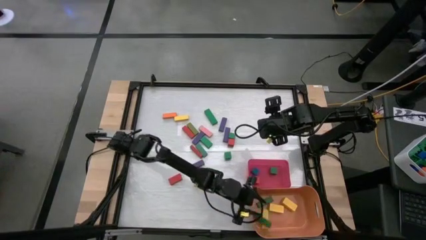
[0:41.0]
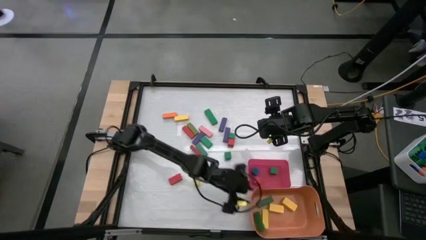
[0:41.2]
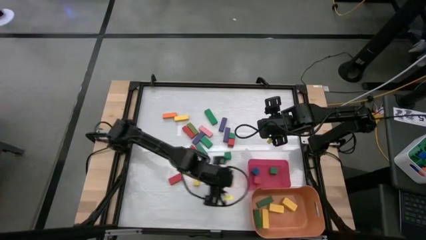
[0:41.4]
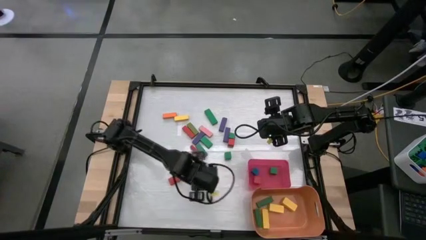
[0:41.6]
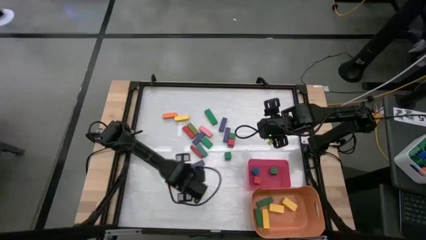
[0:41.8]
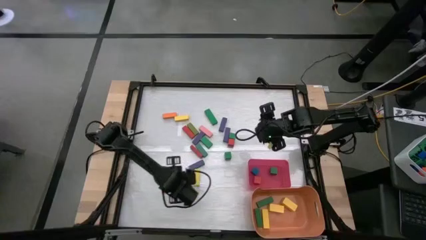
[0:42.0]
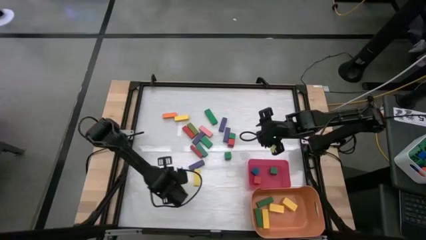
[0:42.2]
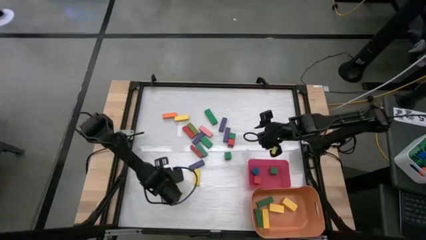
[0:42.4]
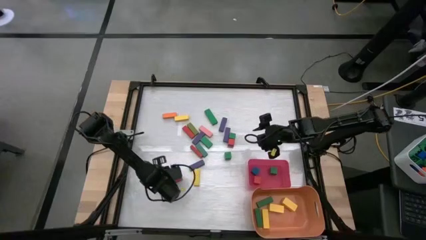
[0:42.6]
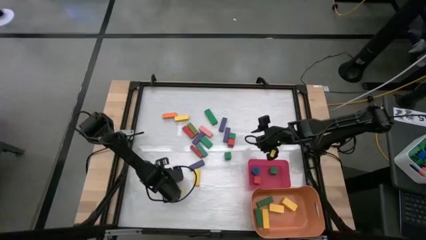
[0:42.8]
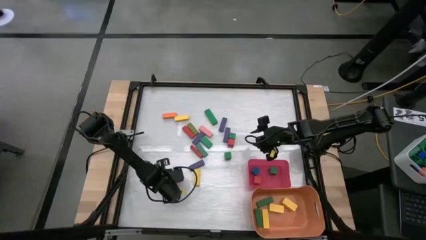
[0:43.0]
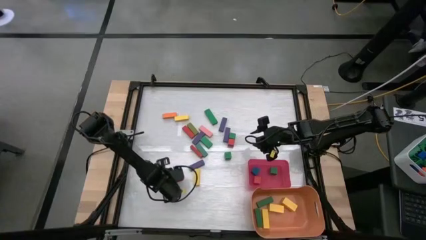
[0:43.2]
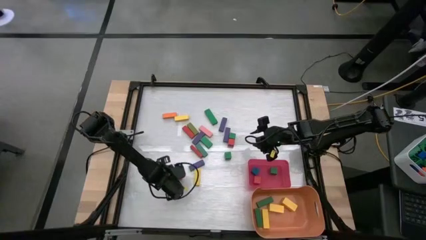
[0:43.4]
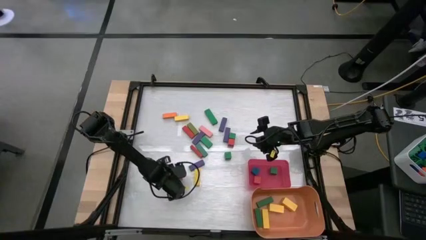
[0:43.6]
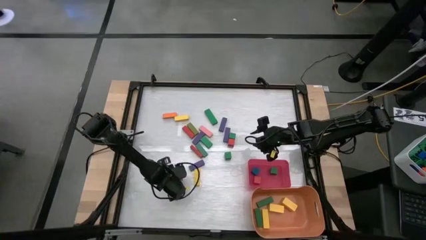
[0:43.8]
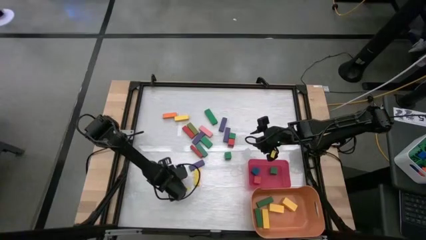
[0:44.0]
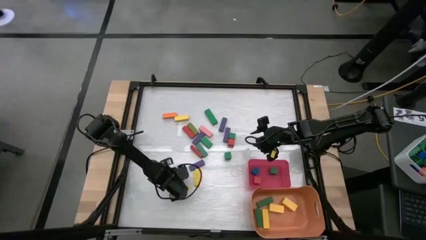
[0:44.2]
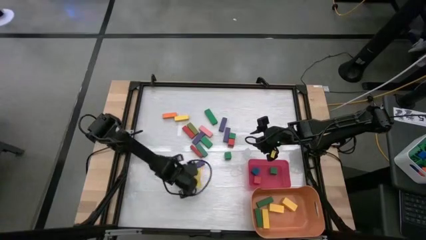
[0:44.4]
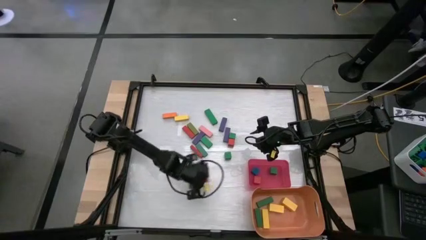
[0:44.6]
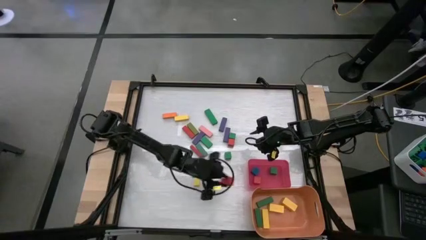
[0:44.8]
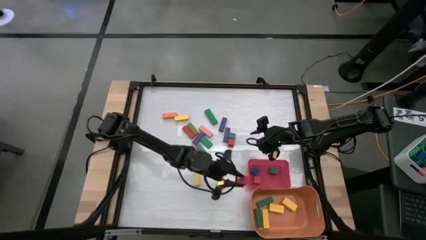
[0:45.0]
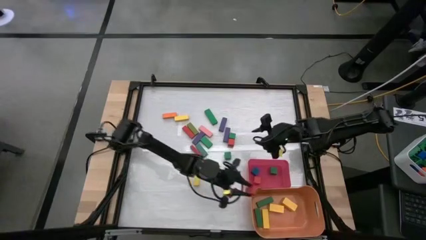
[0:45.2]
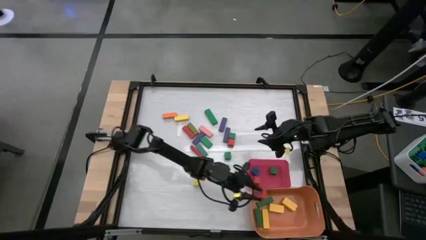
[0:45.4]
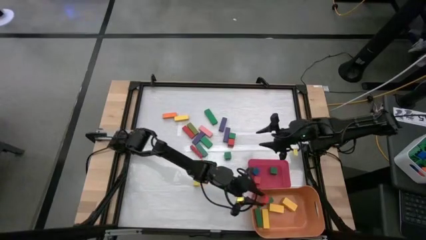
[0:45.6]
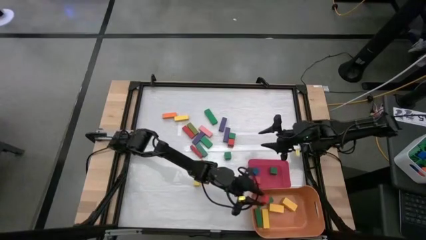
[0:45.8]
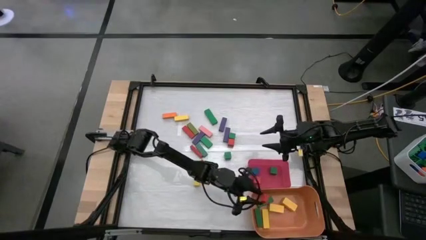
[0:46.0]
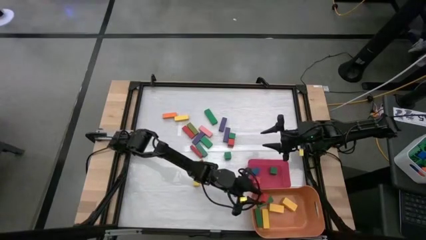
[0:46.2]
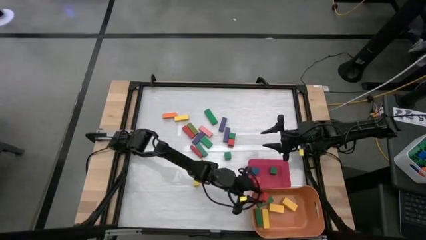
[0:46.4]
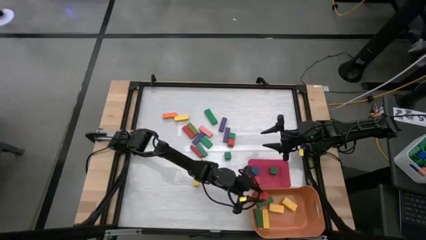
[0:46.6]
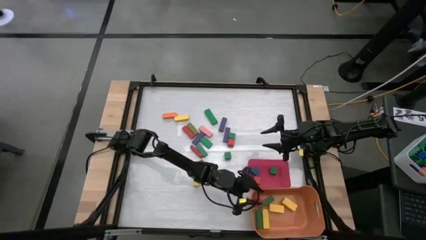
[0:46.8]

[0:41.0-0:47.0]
Task: Sort blocks by size
Put the red rectangle block into the orange bin

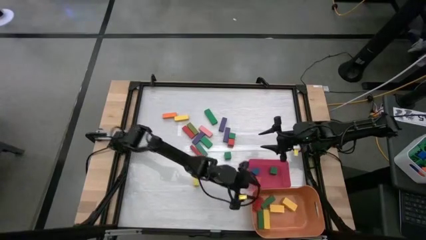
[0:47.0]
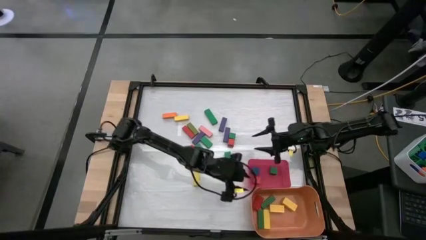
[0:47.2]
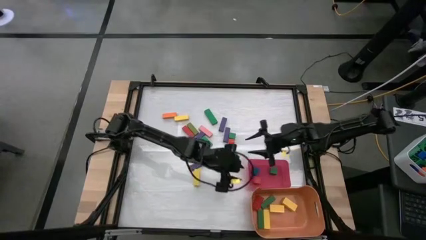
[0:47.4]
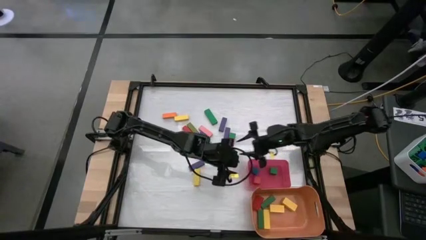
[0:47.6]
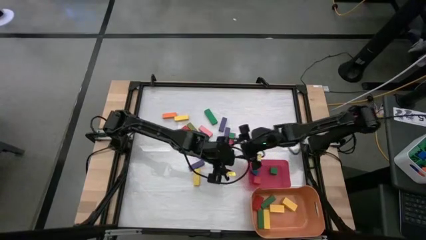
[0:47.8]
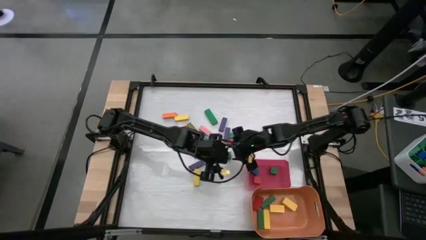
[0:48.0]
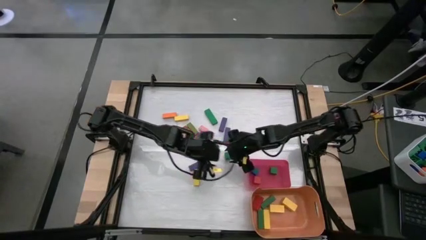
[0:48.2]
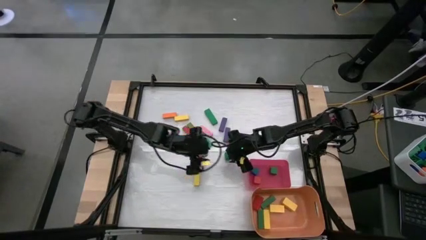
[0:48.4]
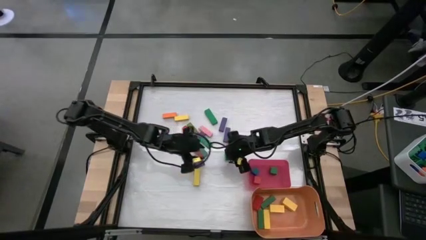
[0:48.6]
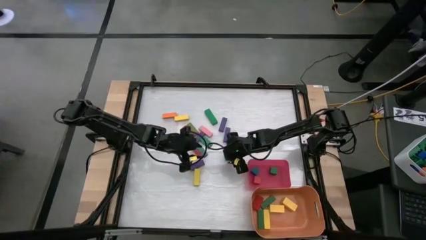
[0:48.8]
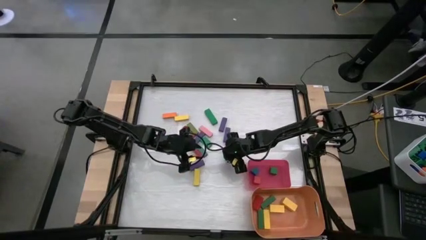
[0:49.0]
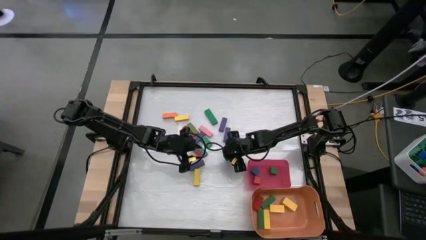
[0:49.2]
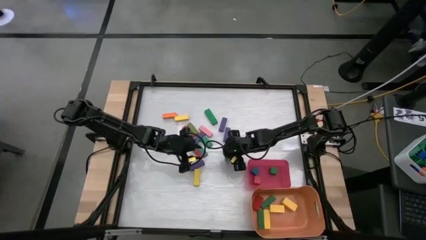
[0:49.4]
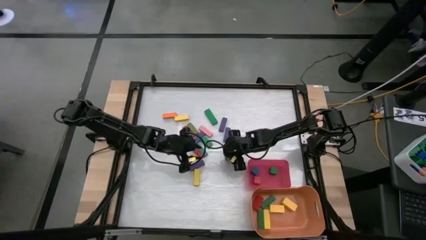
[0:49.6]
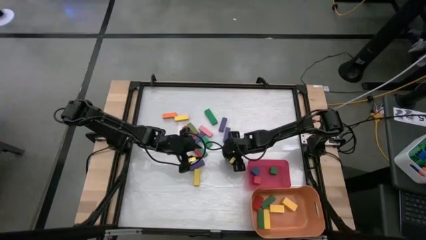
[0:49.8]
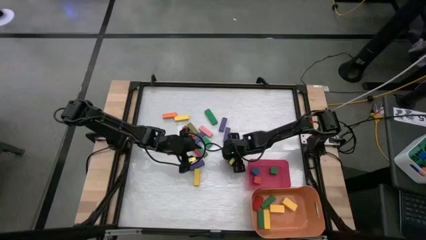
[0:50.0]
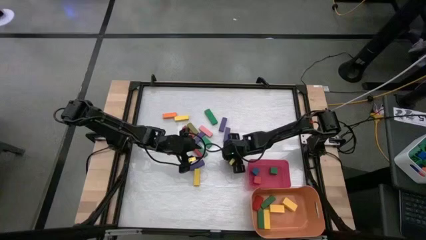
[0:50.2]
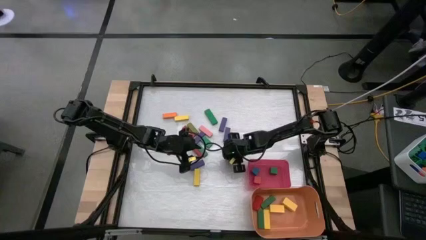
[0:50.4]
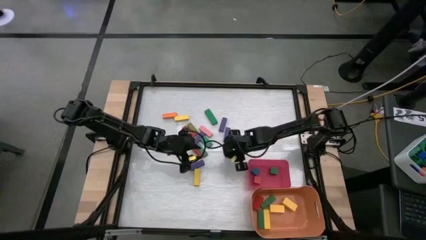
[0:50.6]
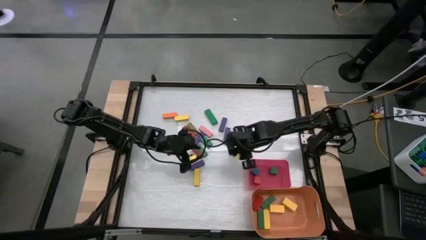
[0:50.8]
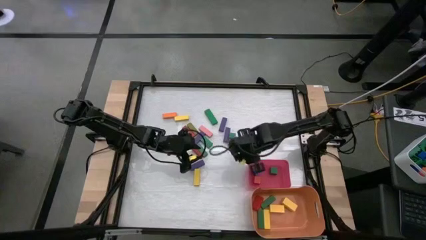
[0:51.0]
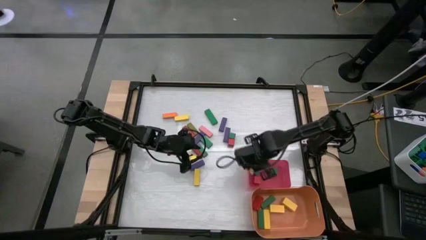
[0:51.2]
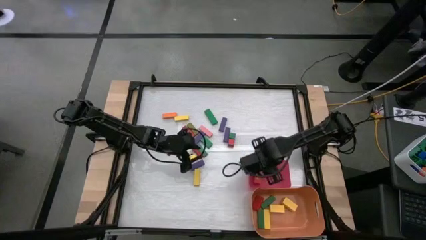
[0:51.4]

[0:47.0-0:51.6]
Put the green square block into the pink bin

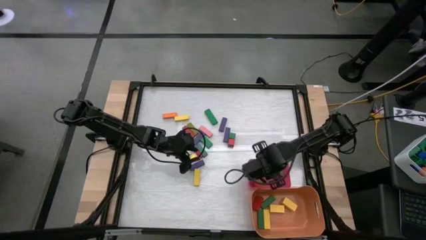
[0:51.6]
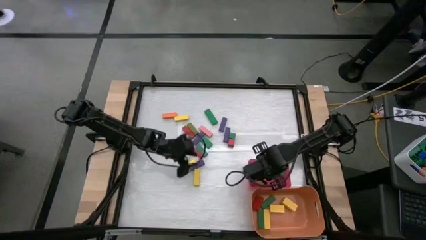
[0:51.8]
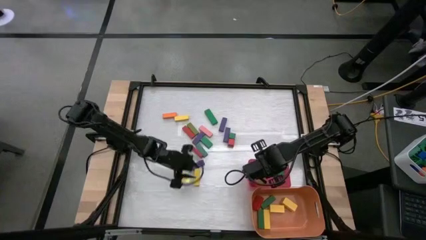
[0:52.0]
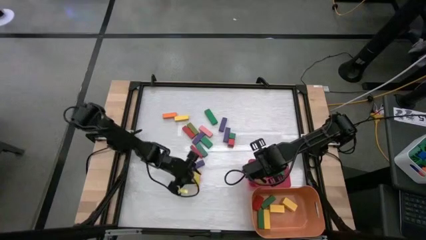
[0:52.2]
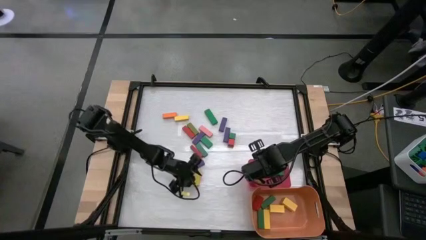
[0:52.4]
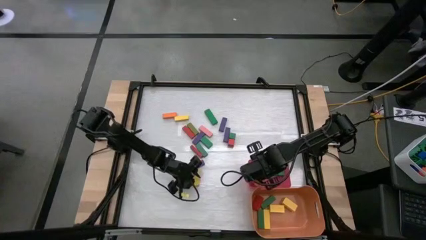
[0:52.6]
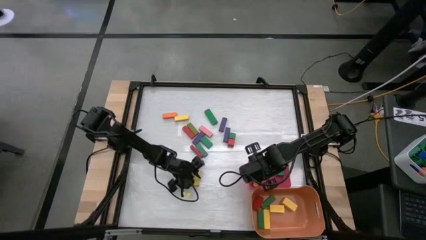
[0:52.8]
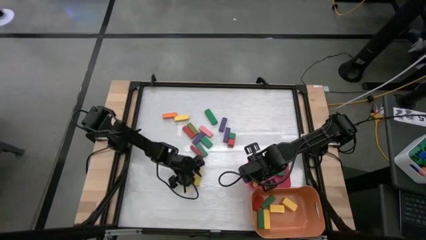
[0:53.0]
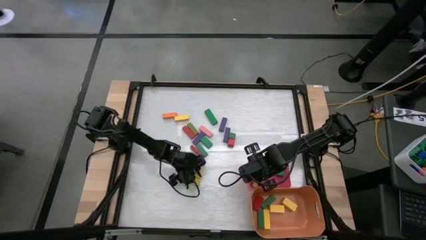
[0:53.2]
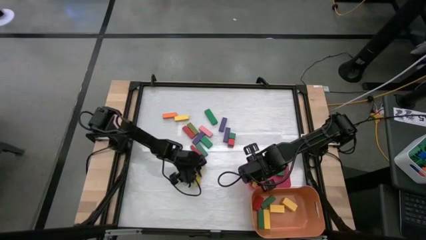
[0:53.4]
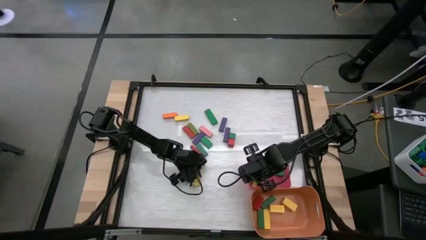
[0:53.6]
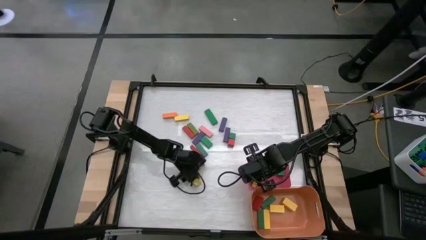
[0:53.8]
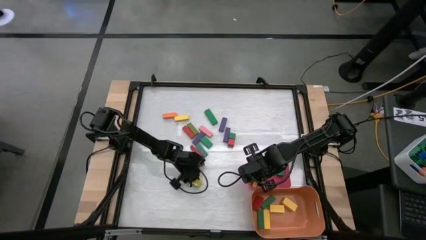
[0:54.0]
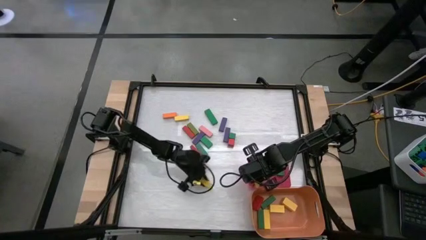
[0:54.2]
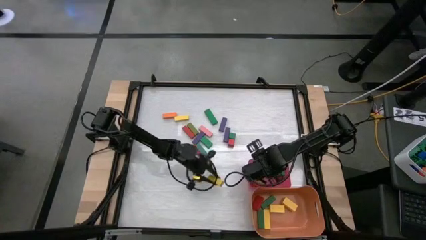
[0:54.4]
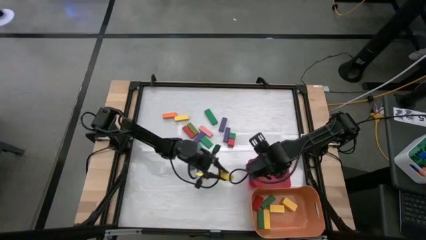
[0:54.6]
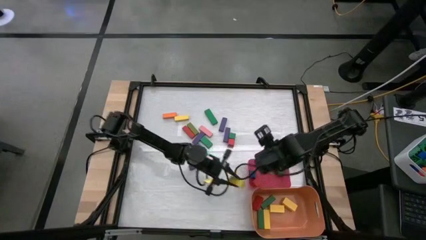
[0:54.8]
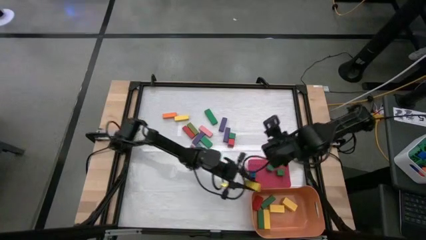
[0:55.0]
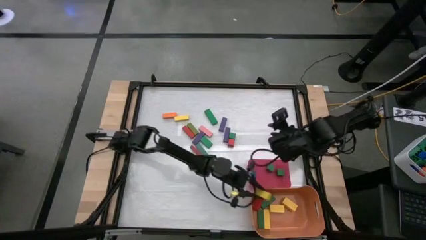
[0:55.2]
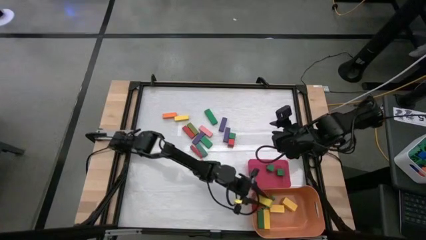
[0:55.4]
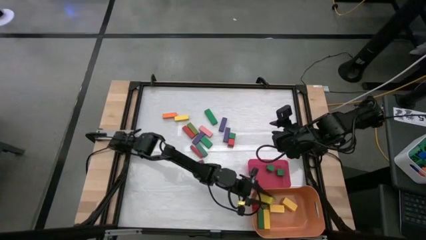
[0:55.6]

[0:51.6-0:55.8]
Put the yellow rectangle block into the orange bin

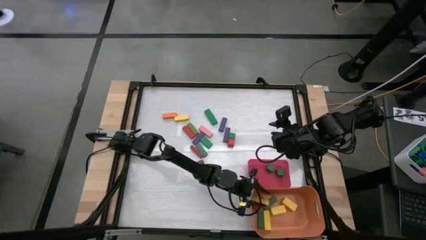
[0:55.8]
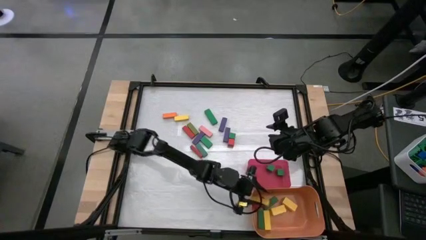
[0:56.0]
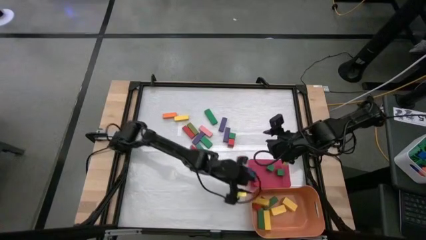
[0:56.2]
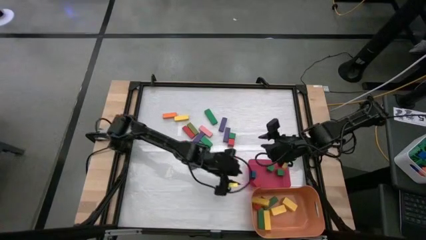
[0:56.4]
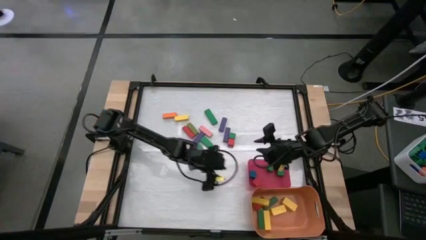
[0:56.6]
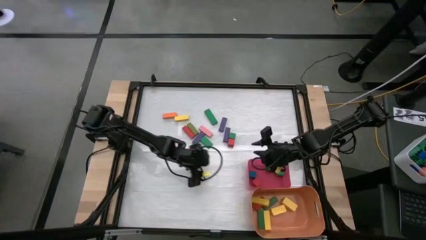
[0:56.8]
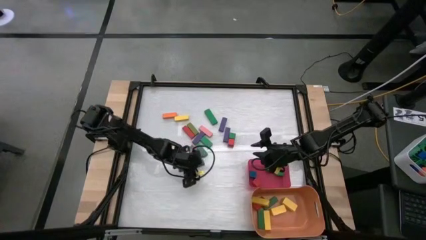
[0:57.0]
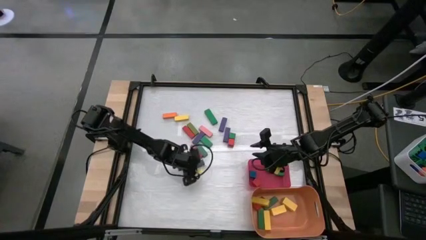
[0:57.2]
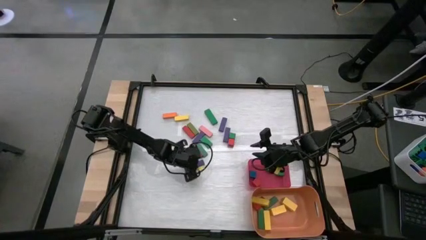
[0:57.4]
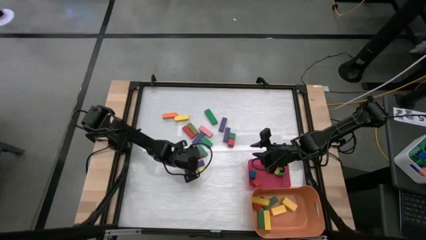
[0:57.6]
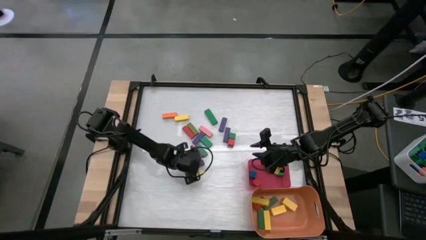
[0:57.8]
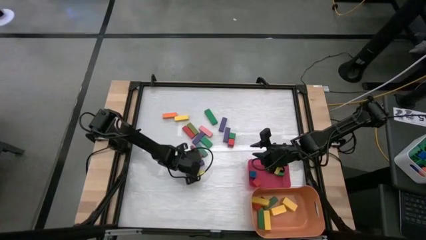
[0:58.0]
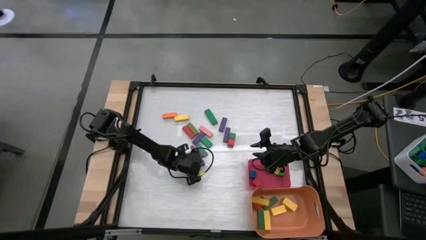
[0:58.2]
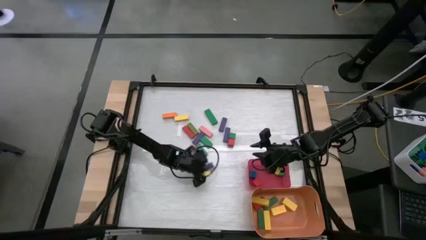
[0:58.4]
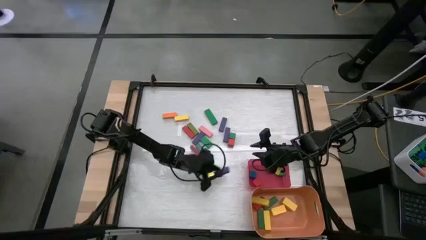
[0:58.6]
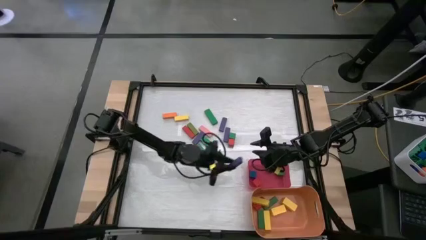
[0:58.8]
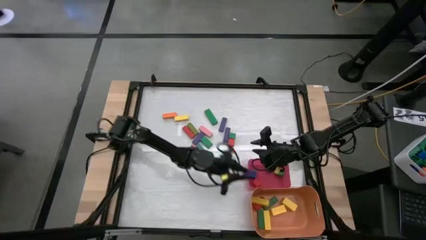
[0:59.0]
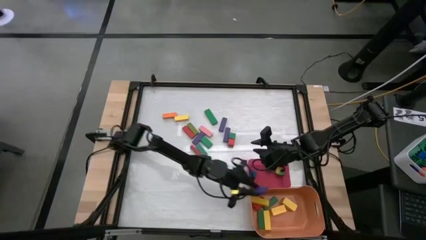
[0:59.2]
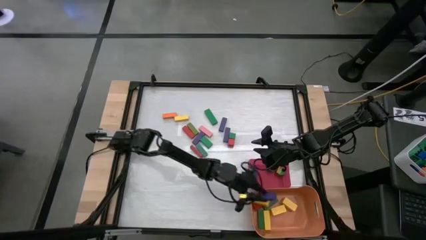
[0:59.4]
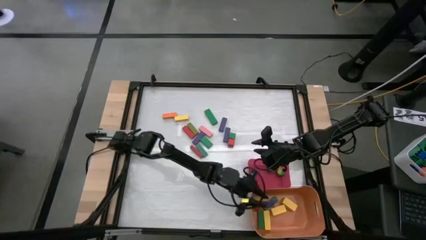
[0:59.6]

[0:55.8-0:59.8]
Put the violet rectangle block into the orange bin
